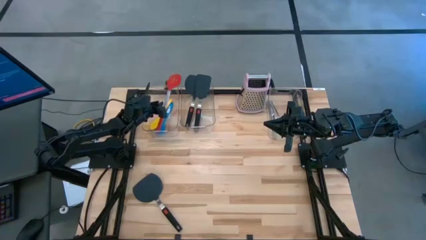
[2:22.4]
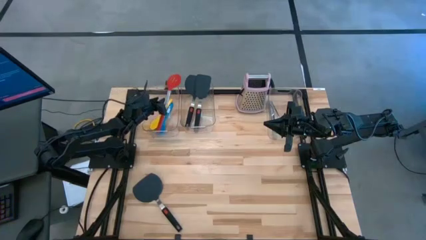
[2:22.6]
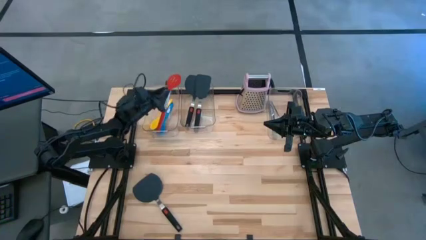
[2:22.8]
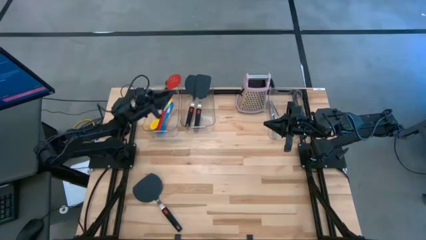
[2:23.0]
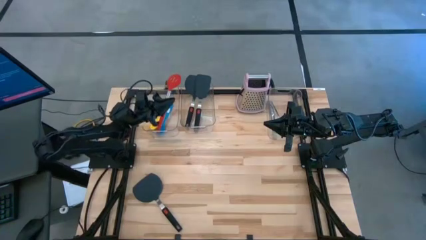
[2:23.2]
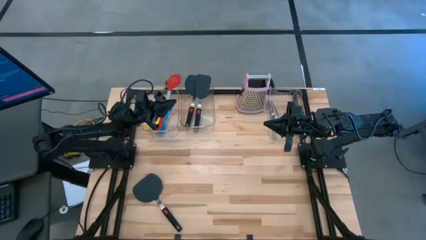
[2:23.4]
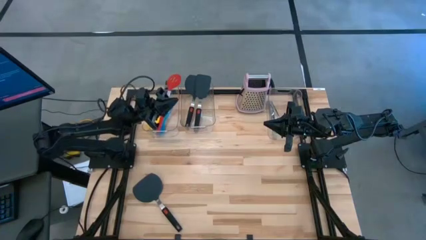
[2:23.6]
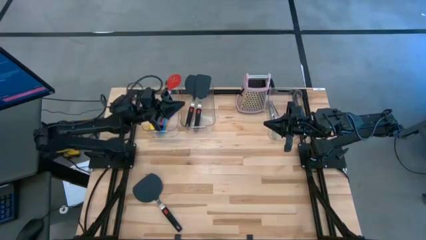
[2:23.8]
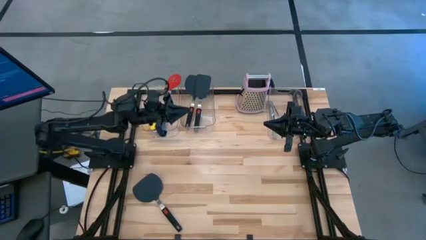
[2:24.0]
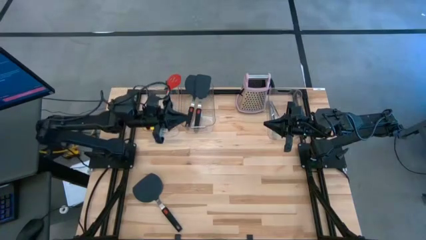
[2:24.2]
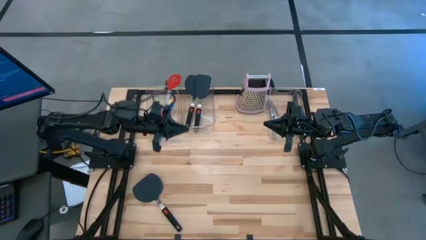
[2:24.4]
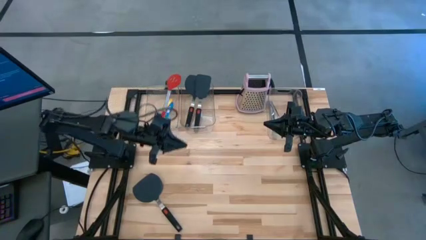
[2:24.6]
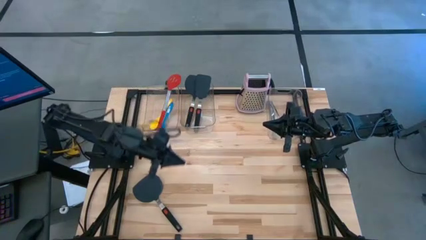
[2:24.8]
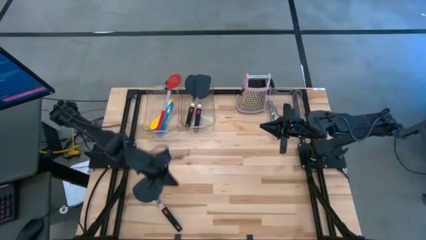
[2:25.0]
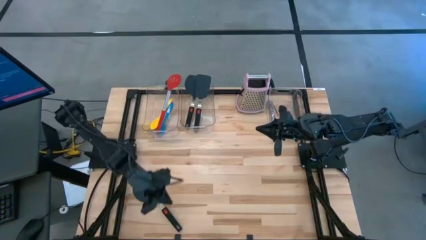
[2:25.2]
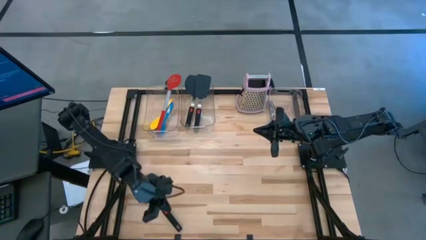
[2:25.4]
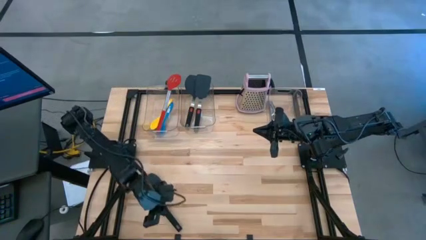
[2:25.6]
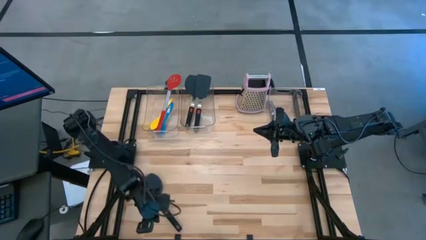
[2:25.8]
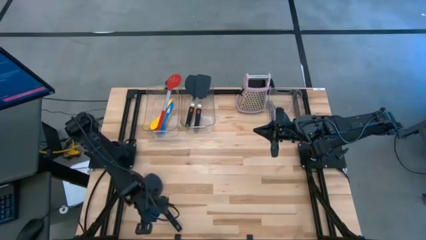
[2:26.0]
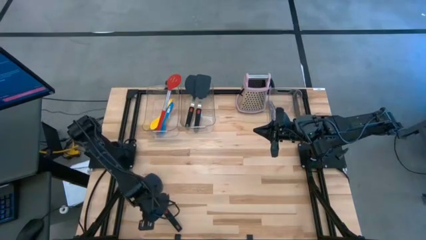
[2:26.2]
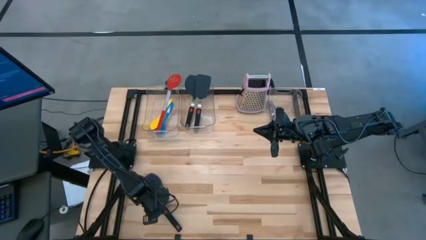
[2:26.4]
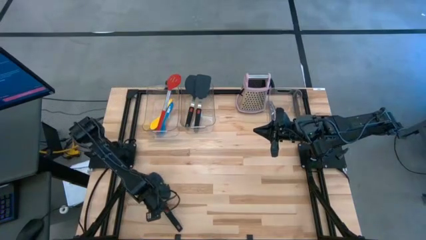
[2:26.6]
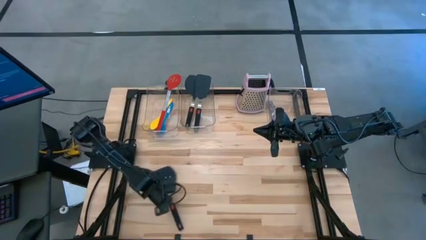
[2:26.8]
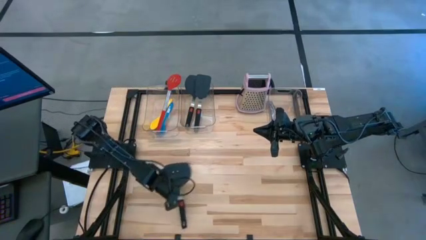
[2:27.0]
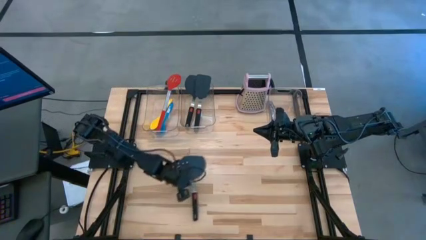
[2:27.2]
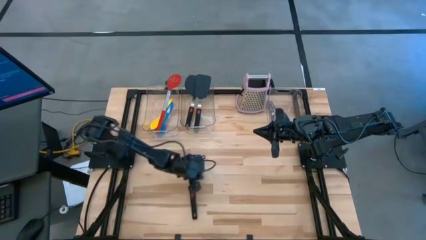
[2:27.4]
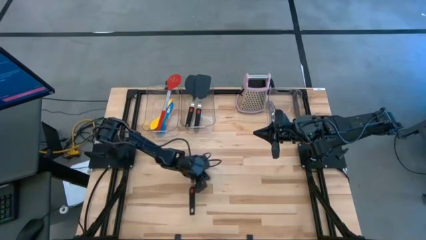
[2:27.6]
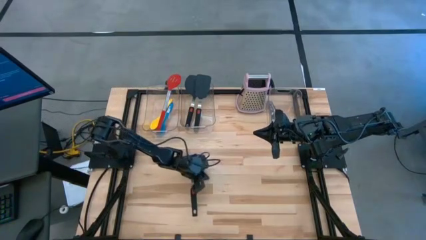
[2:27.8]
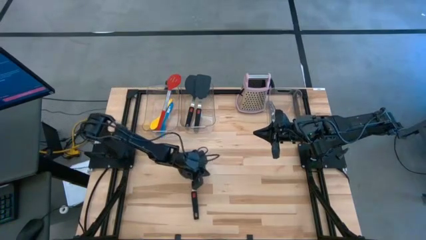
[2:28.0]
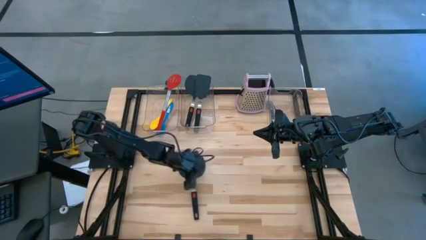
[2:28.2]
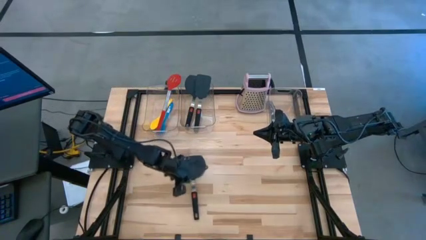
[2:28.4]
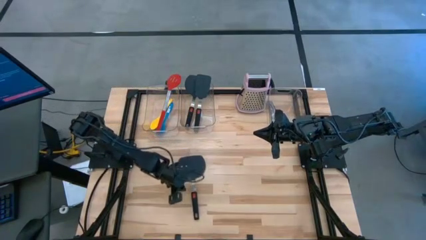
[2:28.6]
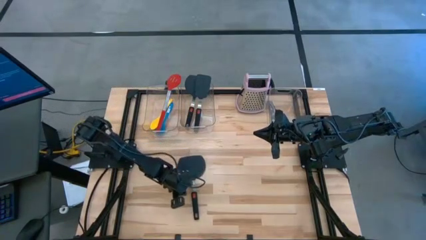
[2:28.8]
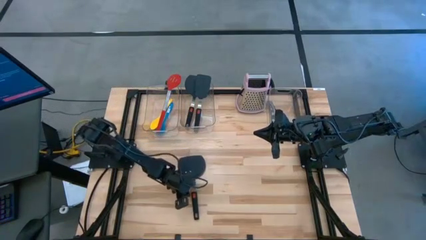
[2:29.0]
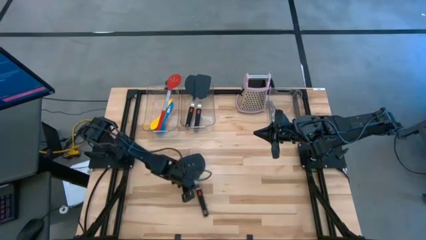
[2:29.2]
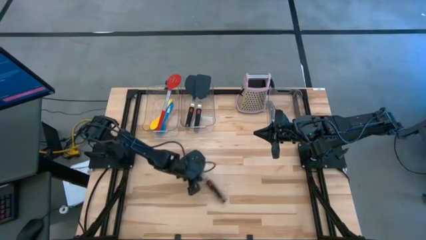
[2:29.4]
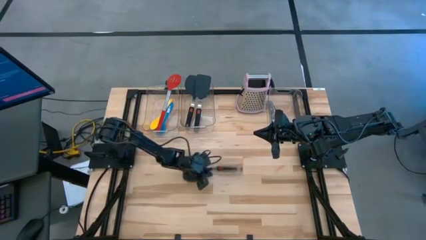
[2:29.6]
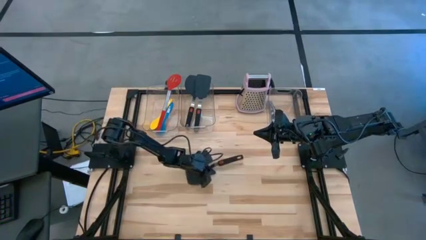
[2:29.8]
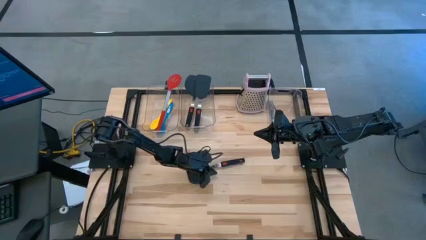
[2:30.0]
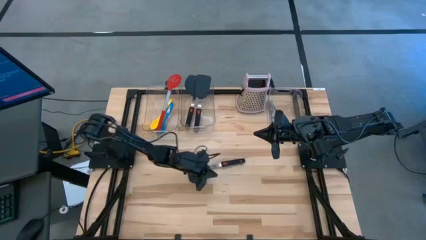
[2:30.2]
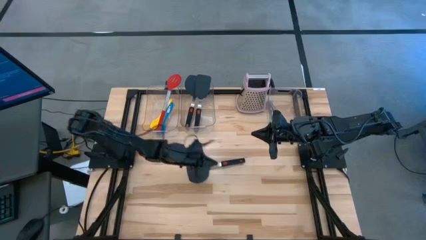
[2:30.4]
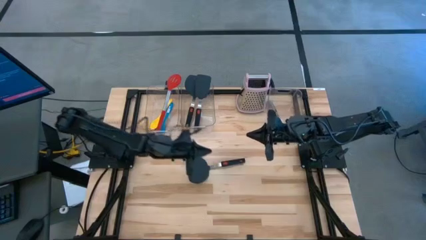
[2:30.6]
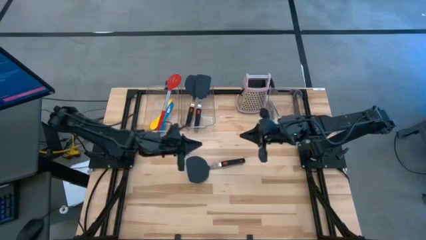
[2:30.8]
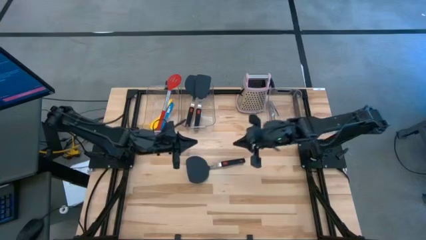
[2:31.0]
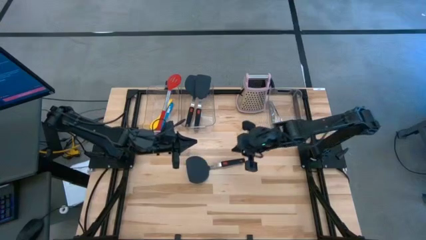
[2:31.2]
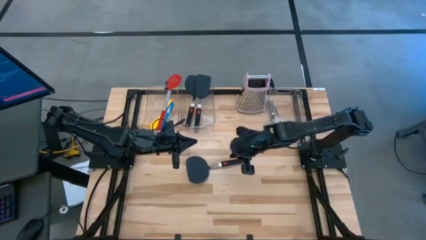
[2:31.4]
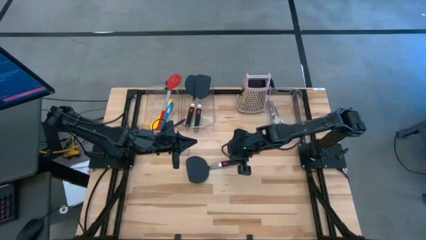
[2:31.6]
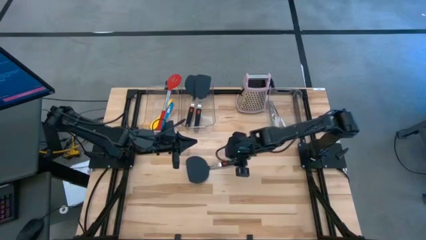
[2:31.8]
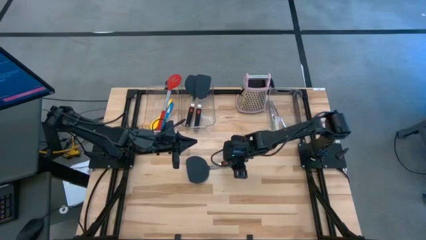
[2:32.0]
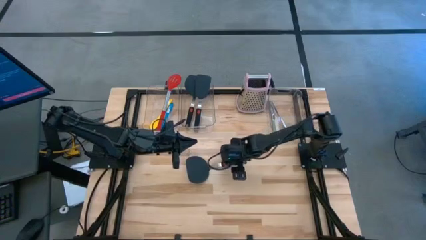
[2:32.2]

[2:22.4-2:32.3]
Task: Pick & Place Kitchen Items
Put the black spatula into the middle transparent bin

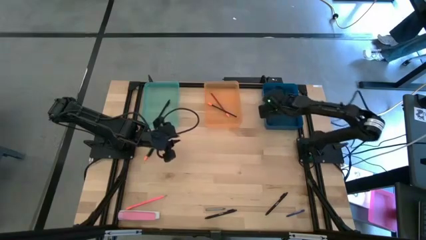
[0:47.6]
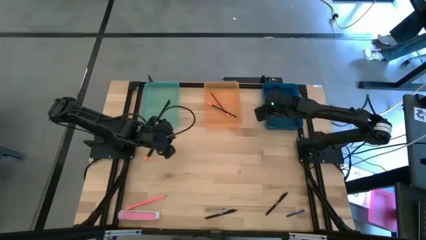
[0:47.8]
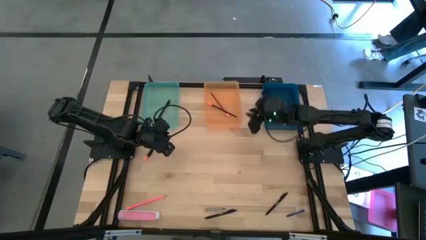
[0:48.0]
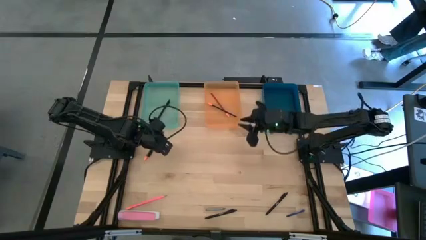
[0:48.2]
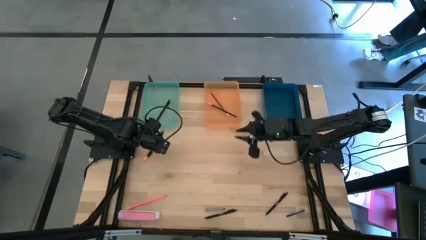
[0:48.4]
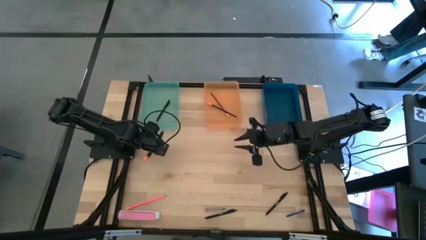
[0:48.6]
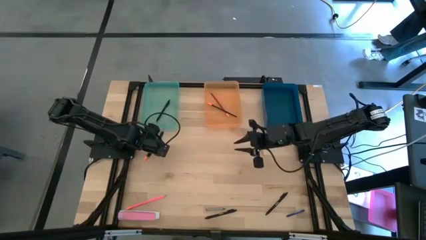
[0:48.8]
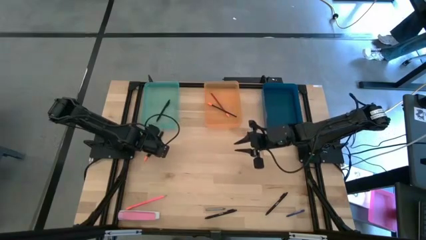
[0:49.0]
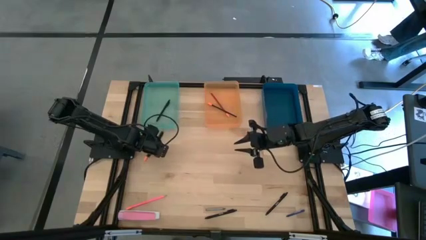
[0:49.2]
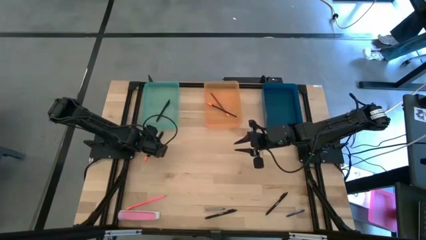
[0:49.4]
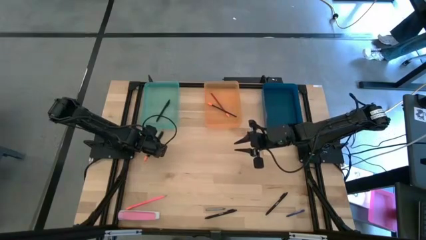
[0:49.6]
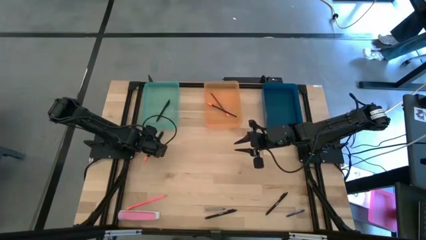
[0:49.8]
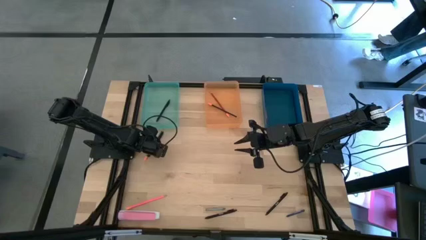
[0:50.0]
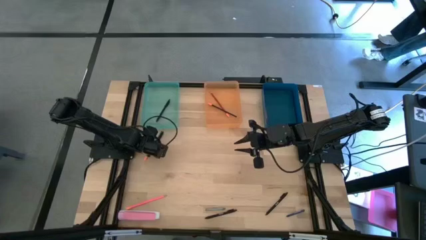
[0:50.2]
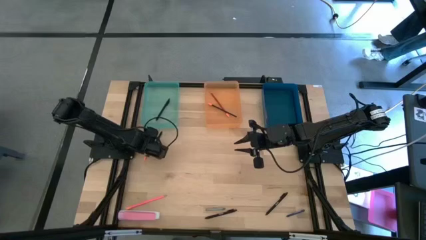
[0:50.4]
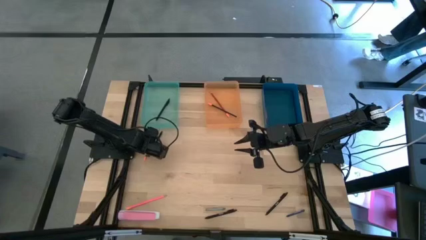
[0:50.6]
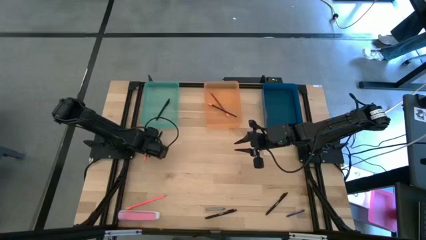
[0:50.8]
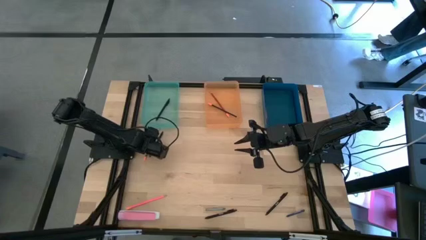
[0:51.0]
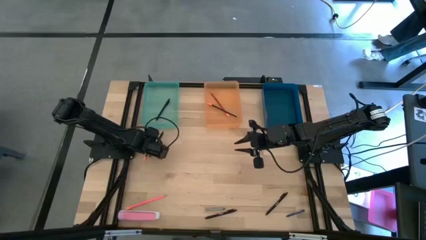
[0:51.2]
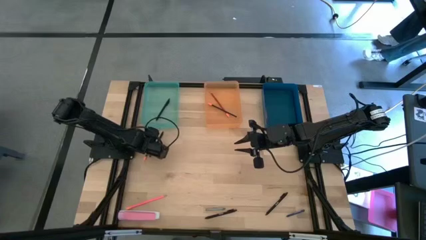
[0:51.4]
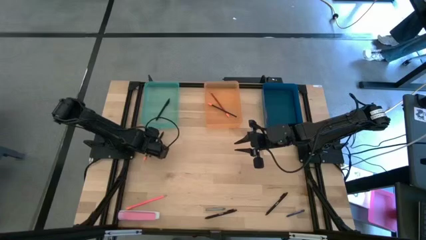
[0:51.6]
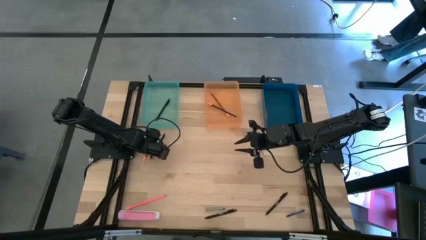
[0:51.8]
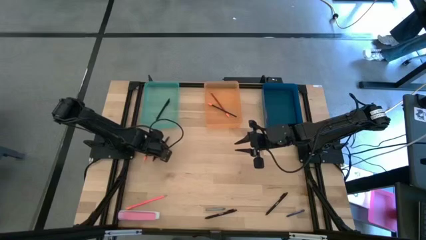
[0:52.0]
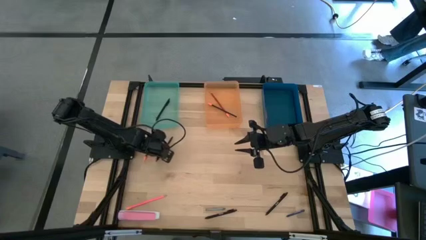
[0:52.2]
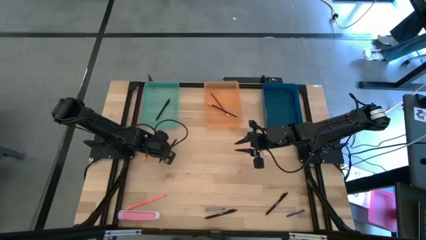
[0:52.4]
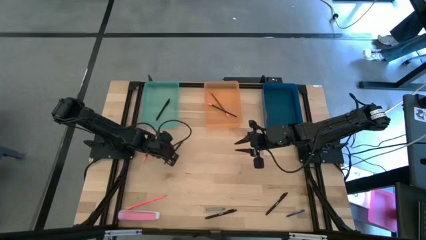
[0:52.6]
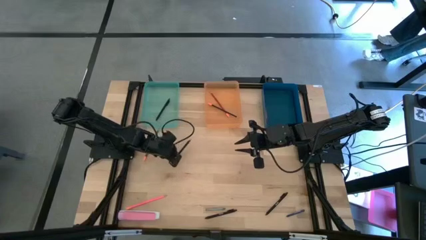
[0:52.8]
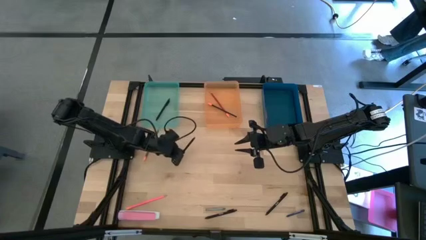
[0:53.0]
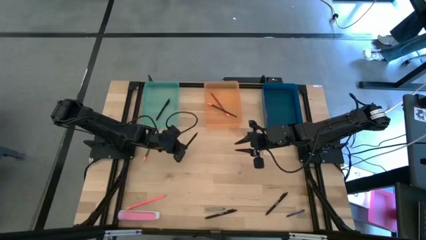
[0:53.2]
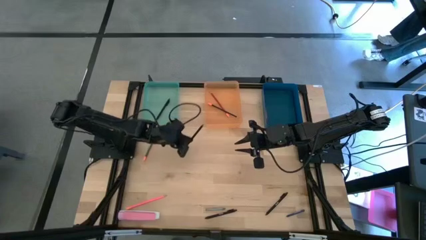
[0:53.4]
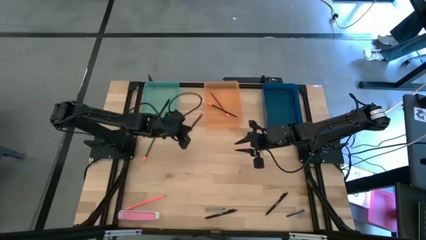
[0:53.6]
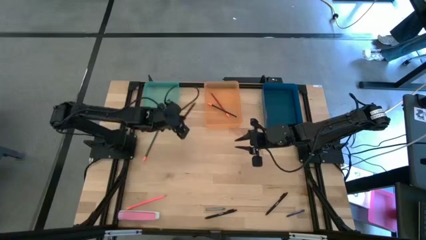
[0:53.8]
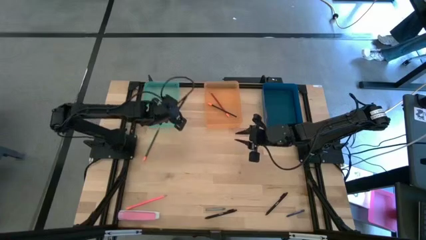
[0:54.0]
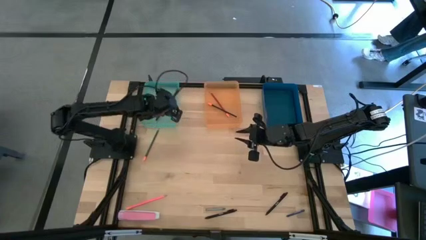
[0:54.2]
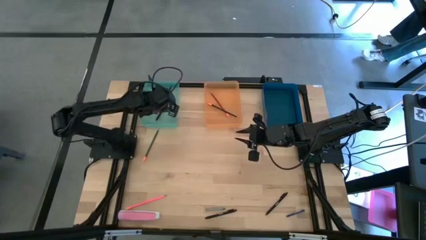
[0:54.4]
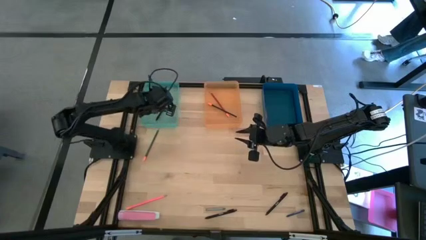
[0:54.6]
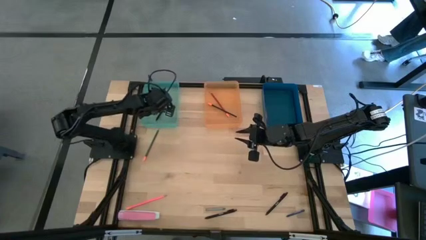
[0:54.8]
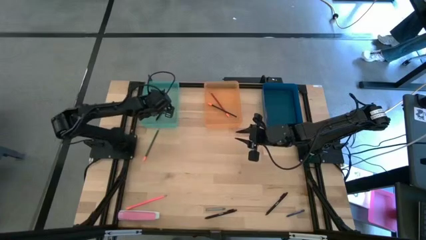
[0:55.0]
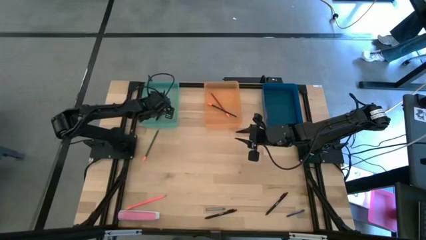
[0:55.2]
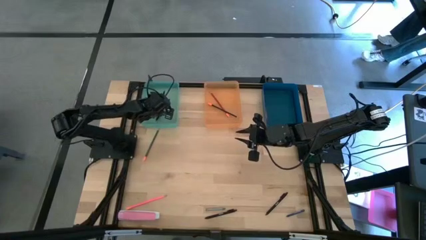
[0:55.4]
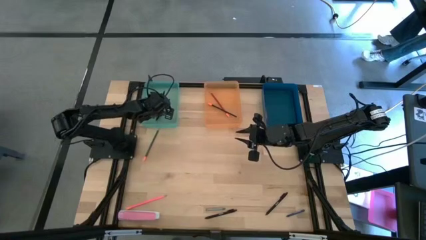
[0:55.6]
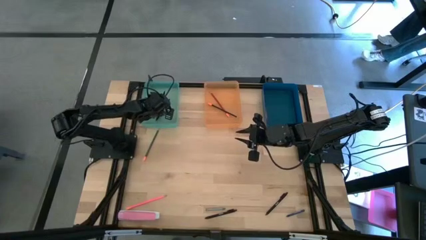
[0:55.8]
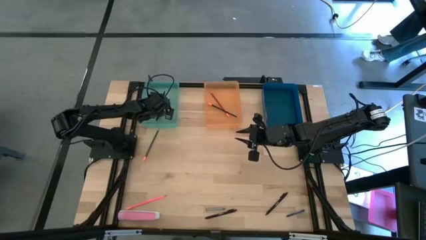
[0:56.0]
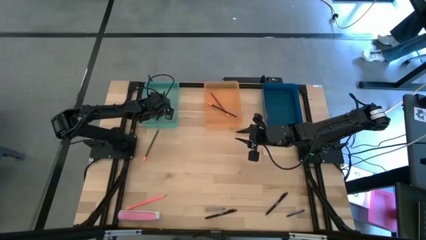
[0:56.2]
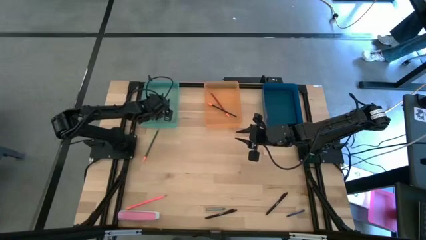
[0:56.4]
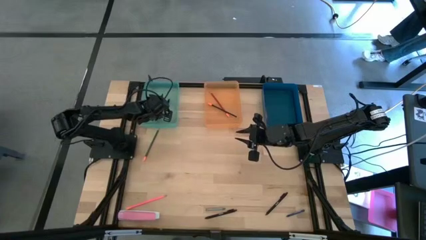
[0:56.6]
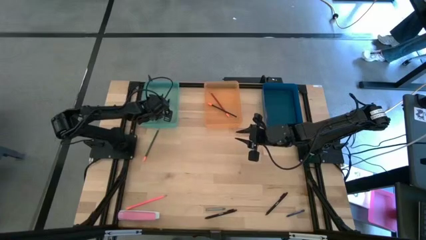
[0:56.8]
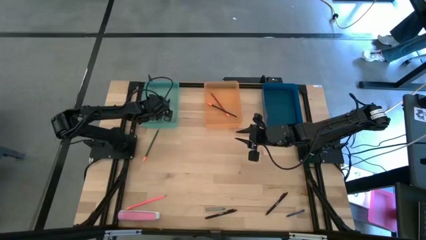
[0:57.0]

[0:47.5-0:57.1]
Task: Sort crayons/erasers/pens/pencils in bins
Put the black pen into the green bin
